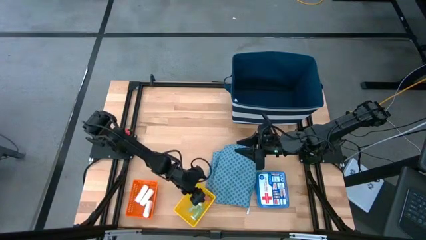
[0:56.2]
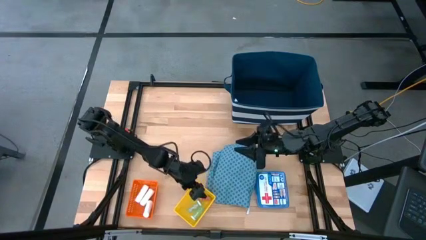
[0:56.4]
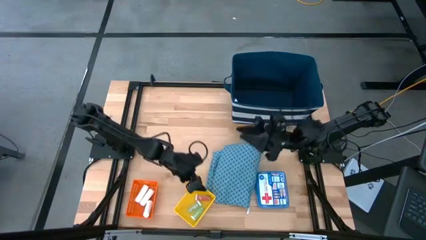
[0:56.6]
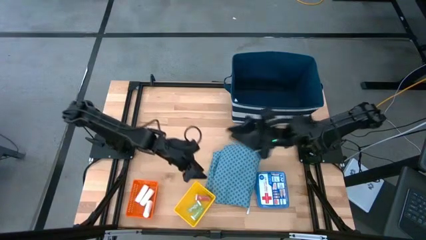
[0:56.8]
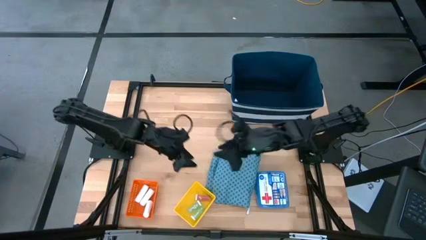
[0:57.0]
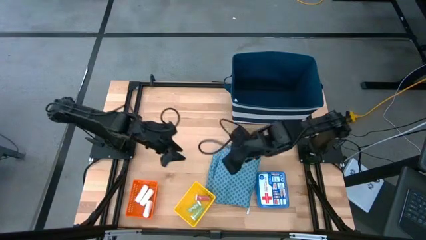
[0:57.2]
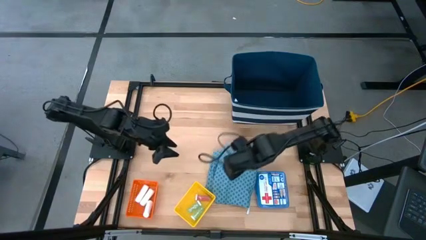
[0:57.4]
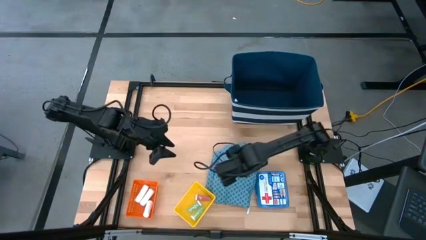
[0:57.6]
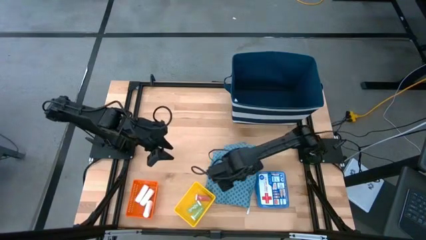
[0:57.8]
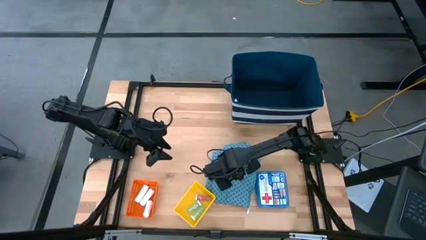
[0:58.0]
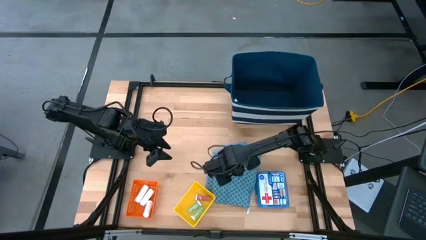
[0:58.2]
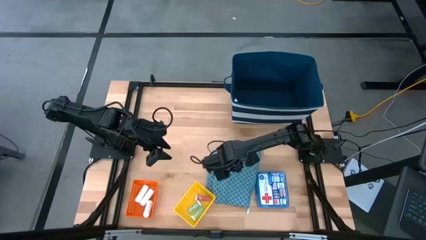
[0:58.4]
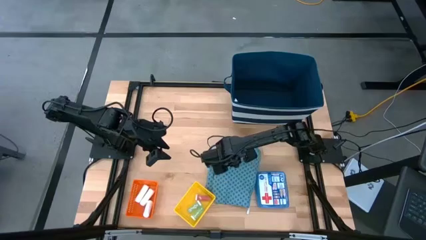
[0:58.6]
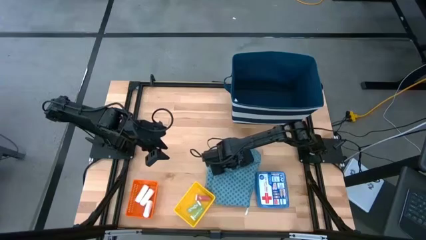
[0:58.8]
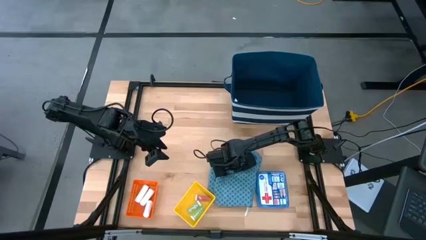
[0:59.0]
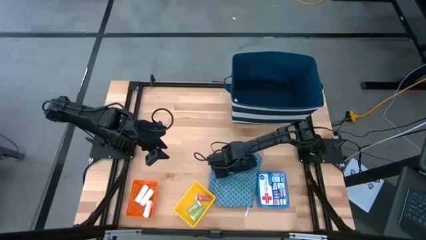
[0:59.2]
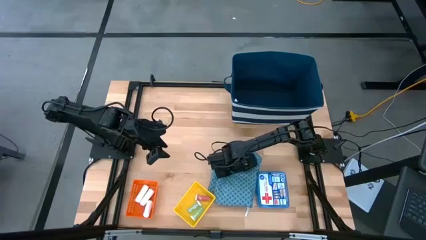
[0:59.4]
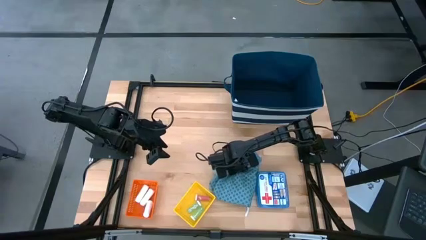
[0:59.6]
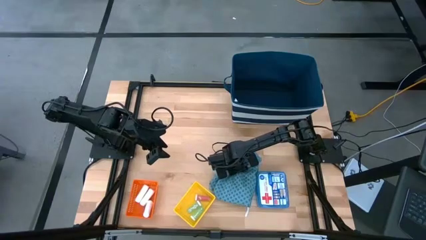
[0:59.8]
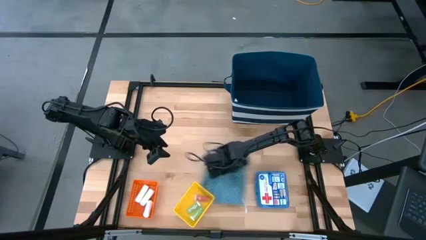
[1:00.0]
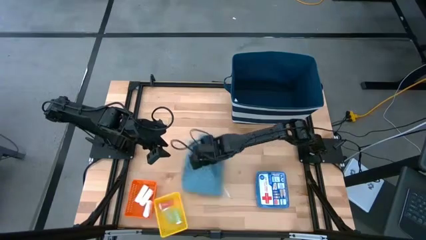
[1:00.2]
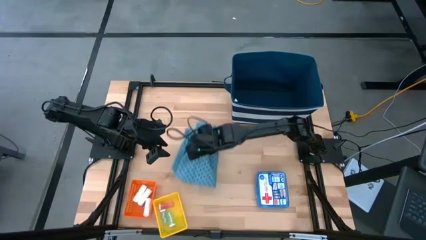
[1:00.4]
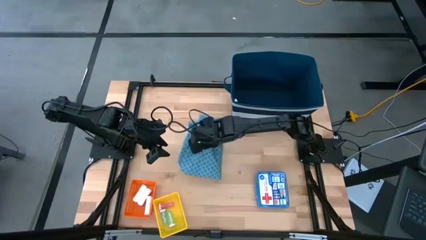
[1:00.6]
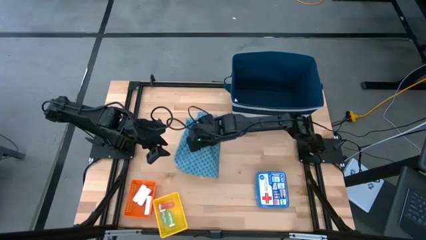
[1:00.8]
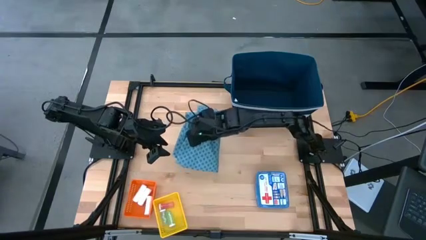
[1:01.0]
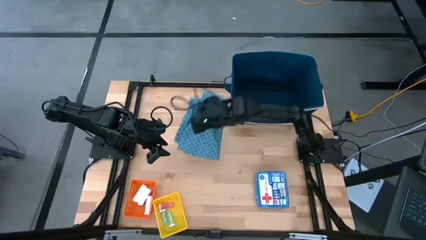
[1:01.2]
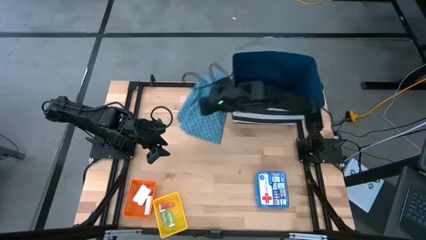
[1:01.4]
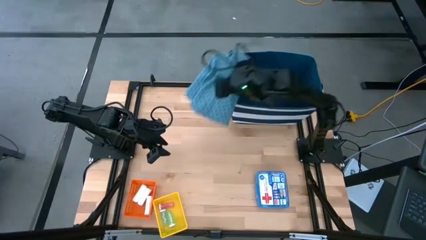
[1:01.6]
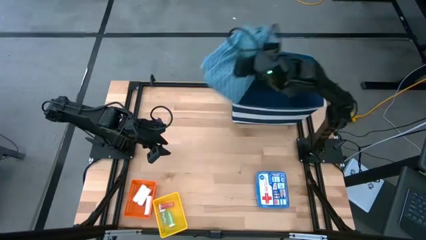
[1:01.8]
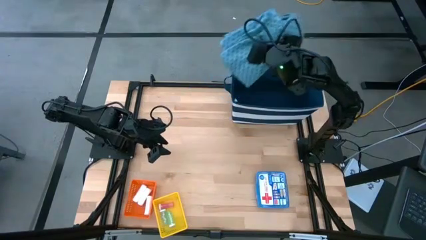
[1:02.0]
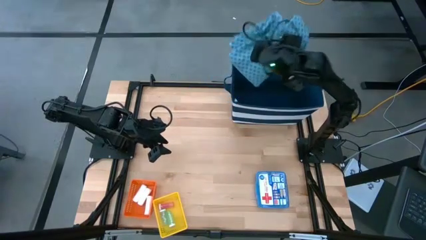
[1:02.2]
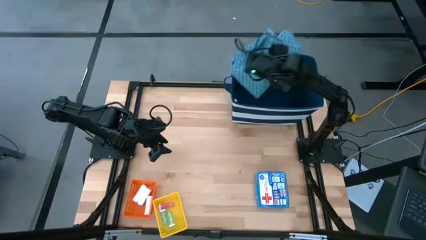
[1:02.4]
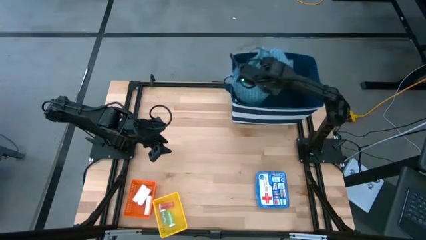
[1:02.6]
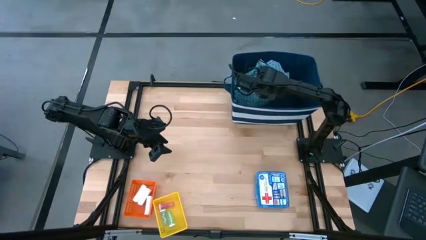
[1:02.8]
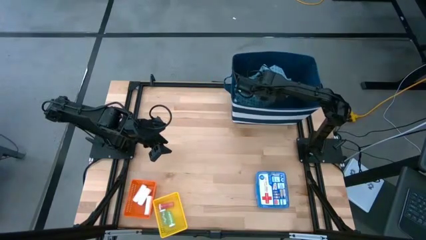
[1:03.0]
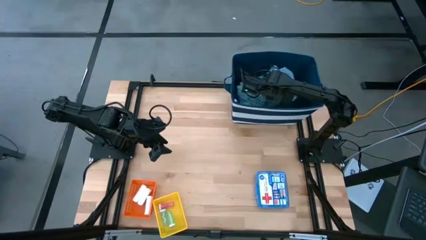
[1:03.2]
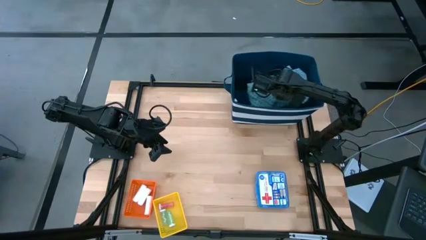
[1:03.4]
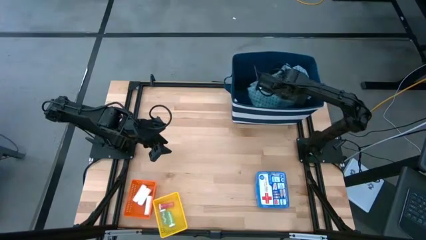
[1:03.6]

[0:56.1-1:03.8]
Task: Pick & Place Medicine items
Put the blue patient gown into the blue bin

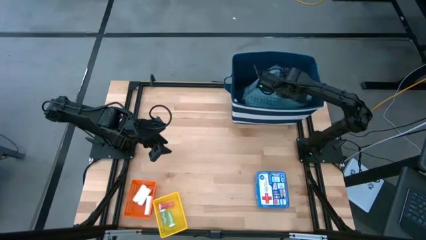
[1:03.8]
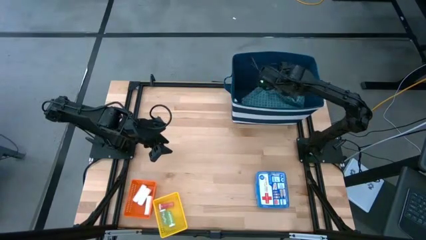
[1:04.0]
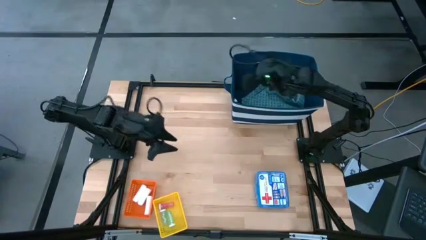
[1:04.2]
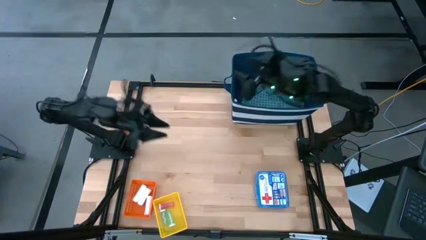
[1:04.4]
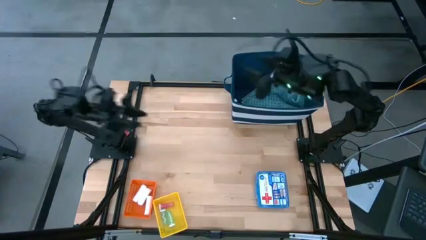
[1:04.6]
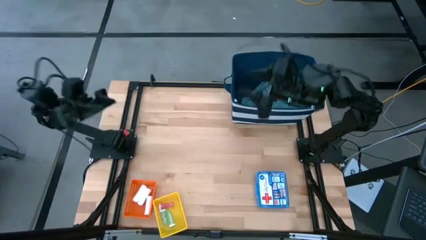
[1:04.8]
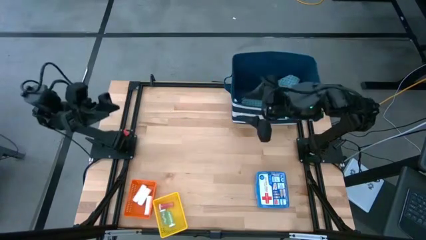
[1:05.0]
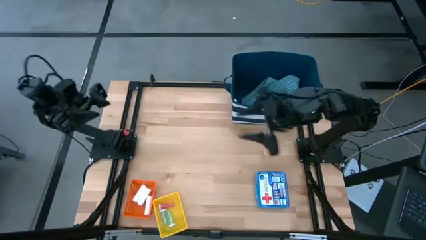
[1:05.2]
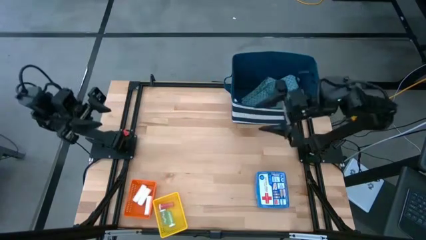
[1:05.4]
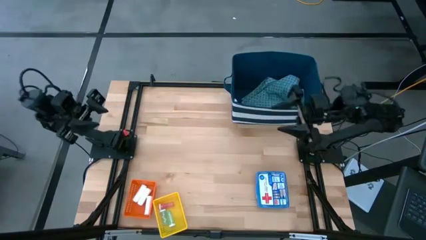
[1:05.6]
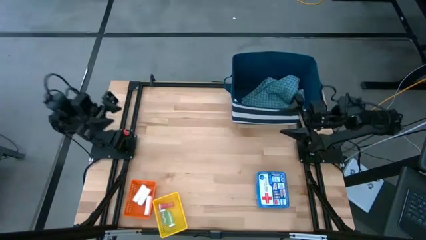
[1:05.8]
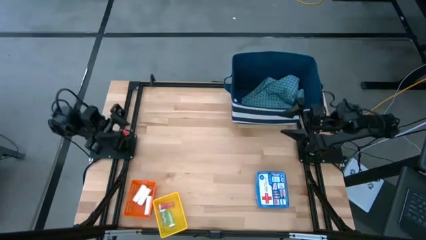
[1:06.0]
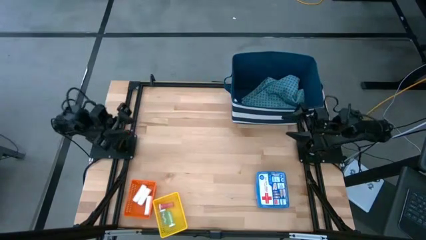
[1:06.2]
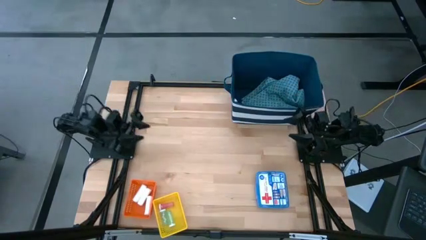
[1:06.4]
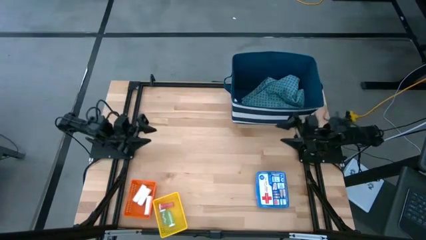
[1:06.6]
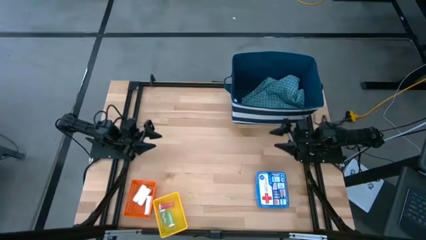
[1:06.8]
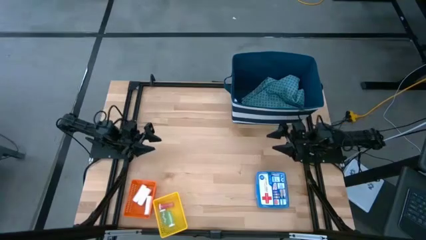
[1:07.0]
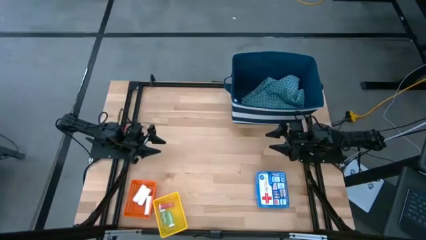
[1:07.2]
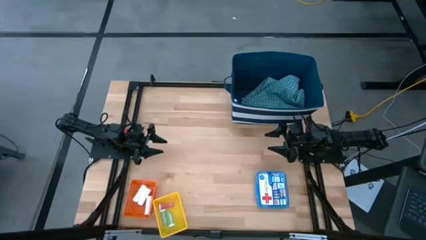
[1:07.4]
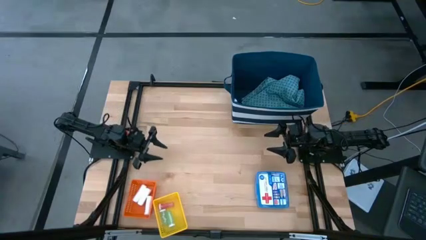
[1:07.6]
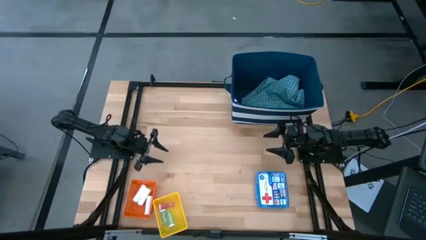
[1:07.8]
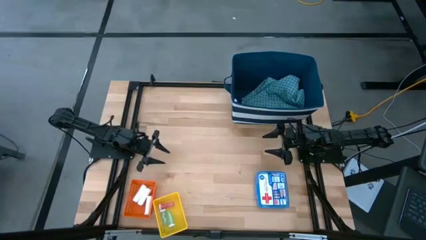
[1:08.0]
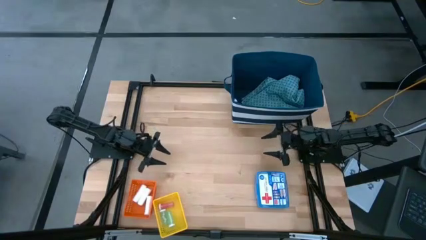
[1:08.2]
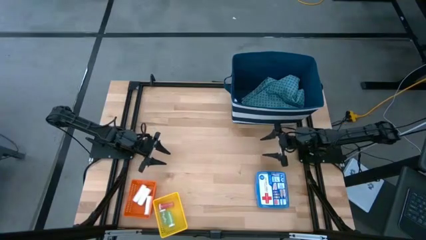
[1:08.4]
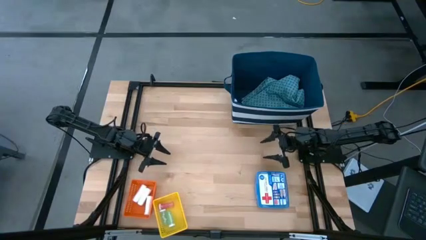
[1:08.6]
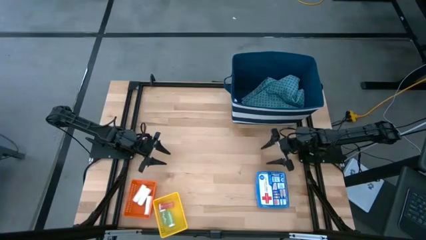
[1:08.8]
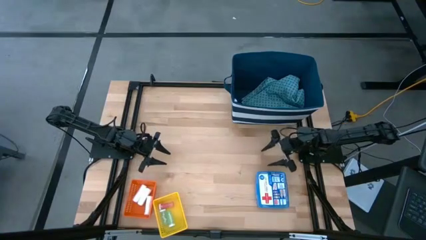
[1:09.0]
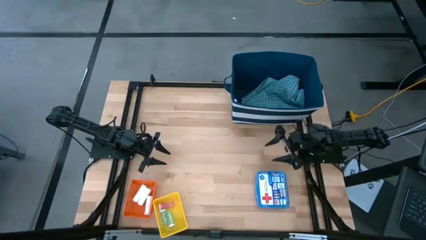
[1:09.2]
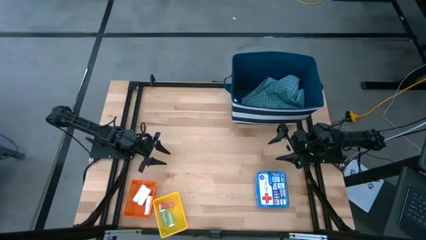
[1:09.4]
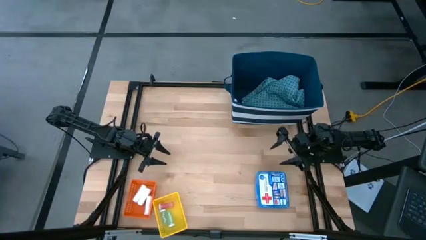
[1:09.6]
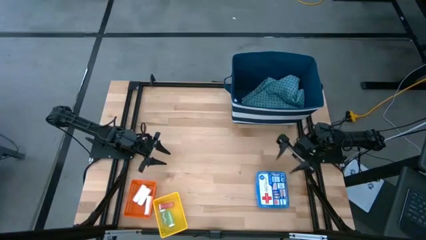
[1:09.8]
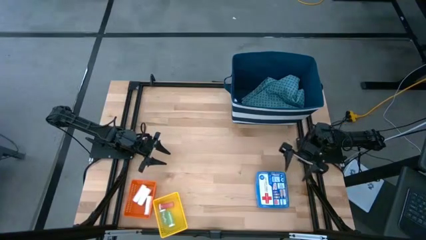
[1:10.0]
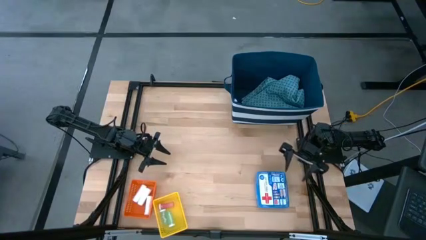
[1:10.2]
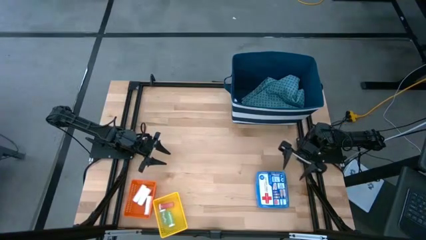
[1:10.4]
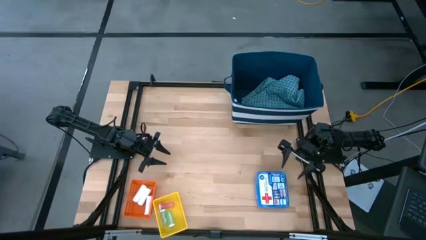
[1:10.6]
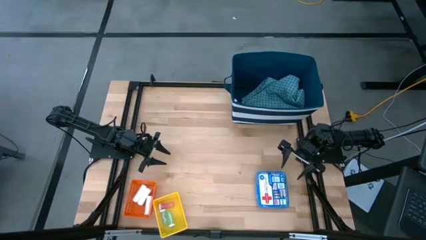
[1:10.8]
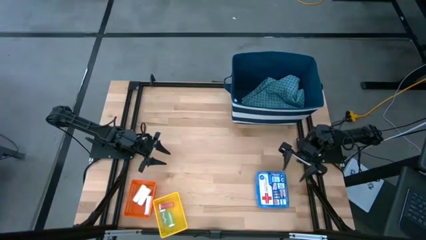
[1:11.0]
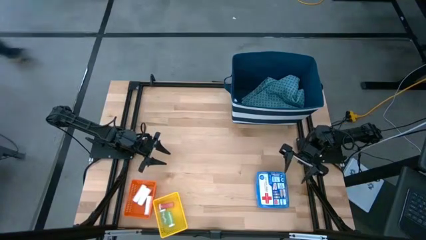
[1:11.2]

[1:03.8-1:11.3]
Return to Home Position
